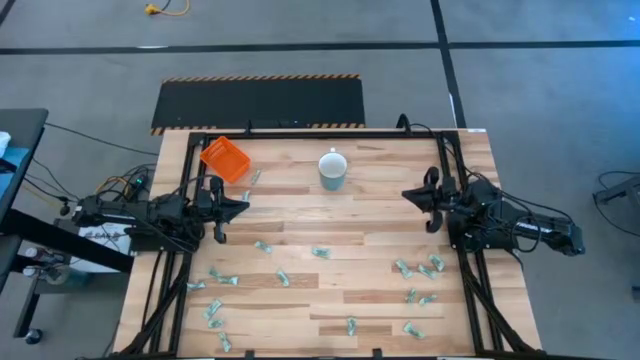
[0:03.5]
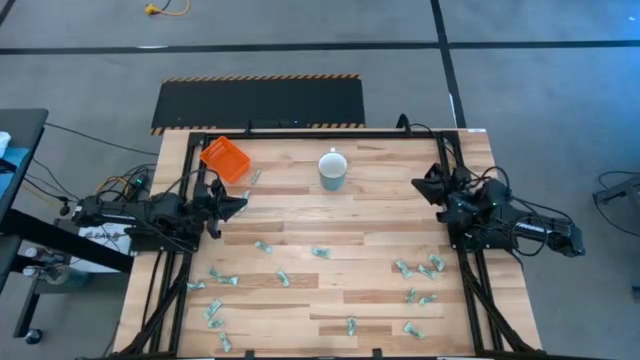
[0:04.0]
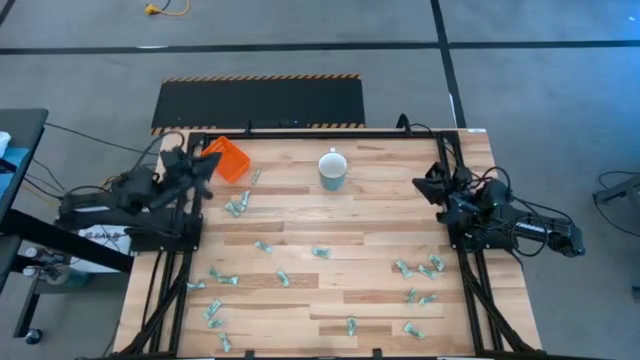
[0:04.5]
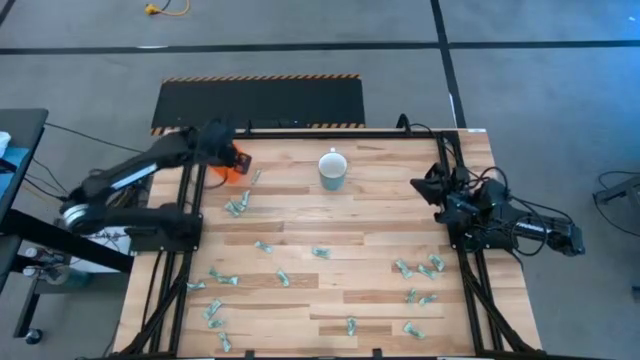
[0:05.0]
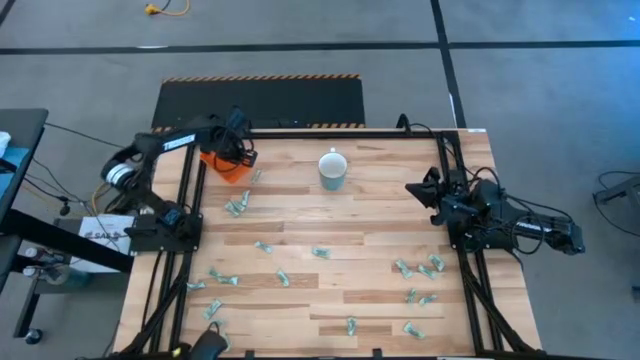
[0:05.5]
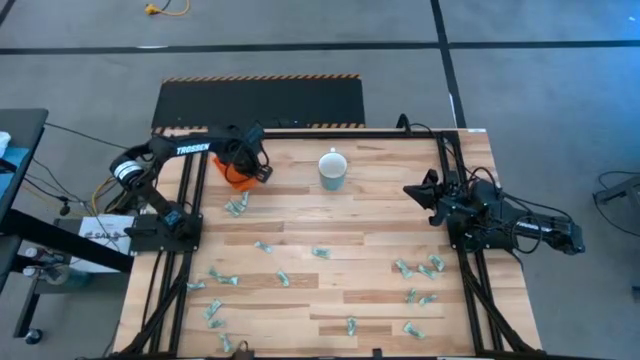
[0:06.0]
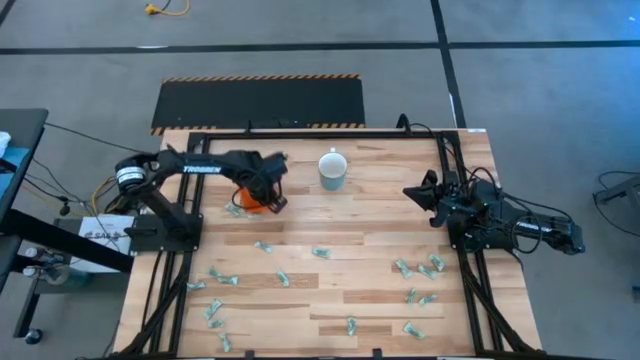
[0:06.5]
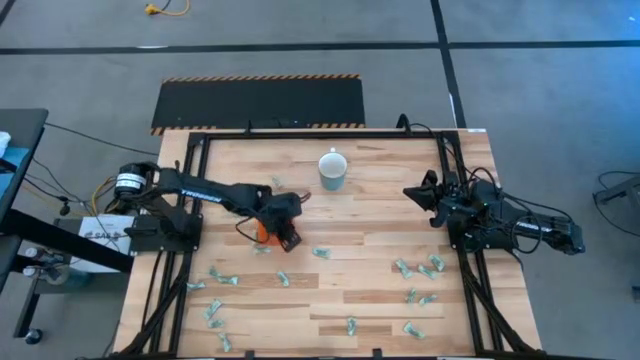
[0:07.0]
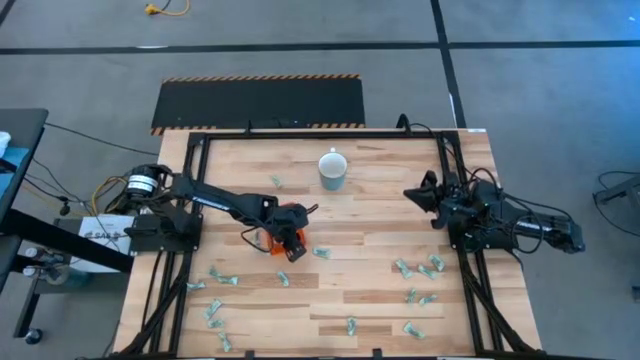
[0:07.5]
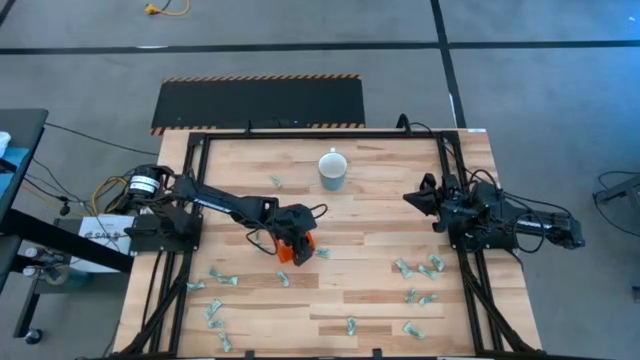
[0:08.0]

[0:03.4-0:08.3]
Task: Pick and place items into bin
Prepare the orange bin

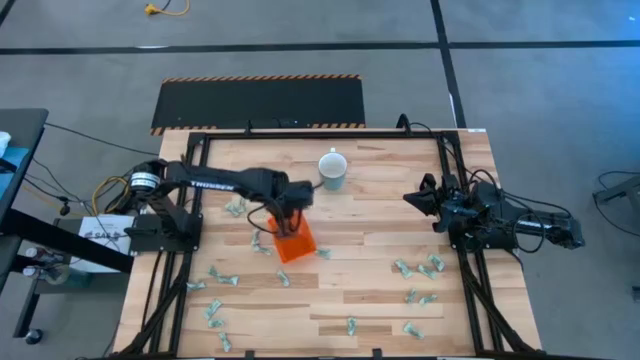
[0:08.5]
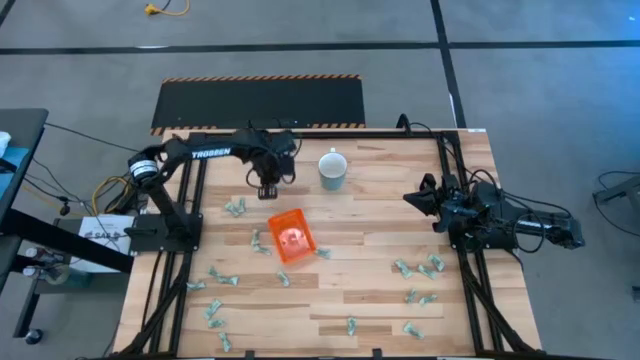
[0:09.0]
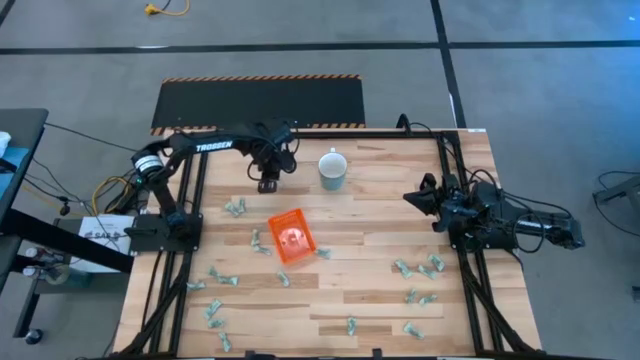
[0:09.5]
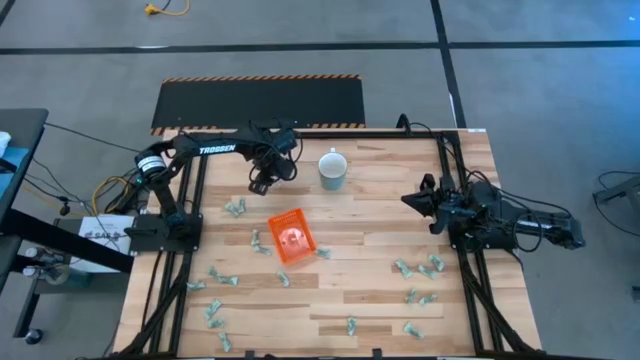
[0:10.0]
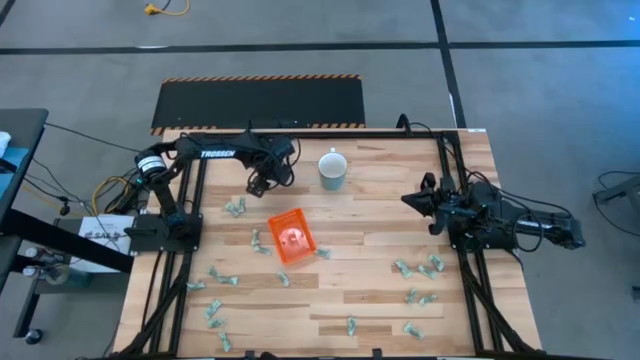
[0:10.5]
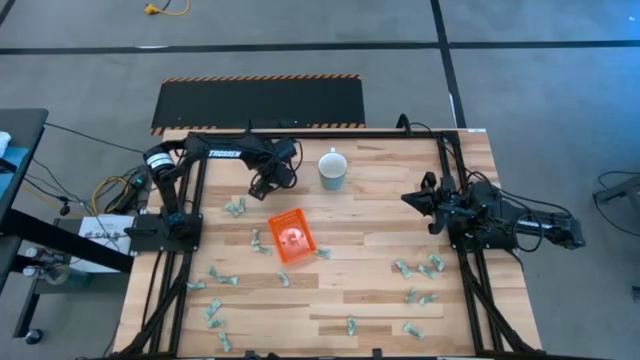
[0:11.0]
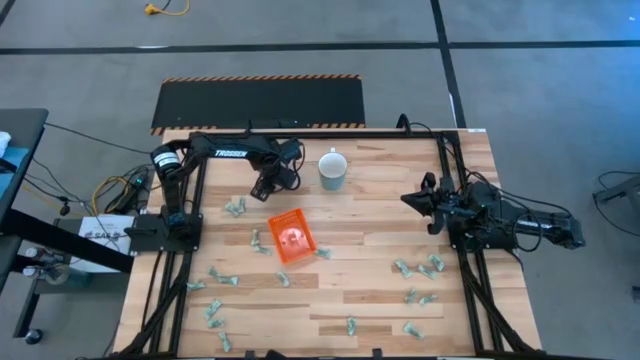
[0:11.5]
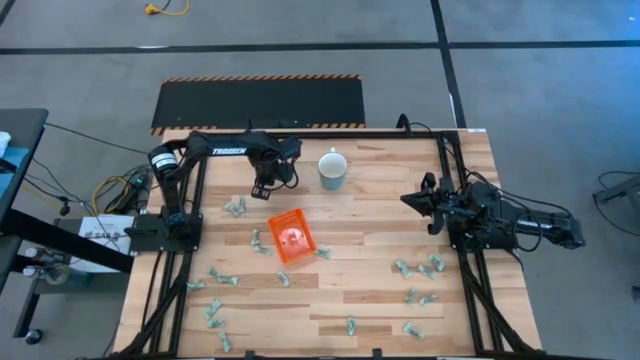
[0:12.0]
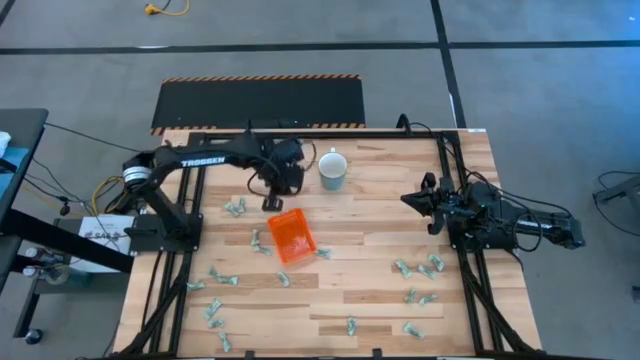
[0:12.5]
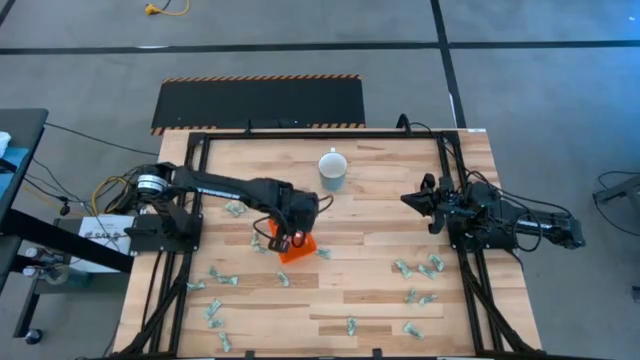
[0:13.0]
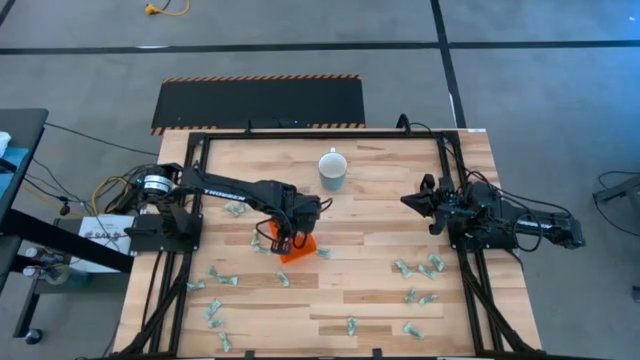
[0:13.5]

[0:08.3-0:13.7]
Put the green stevia packet into the orange bin

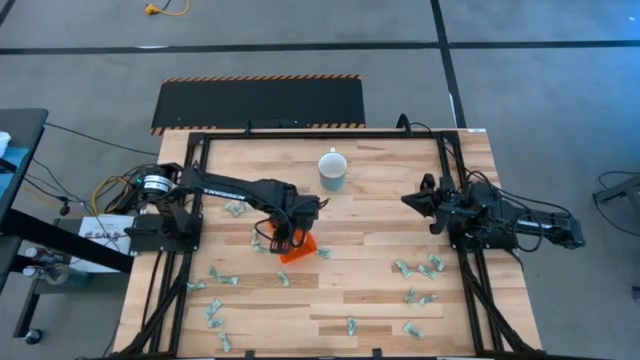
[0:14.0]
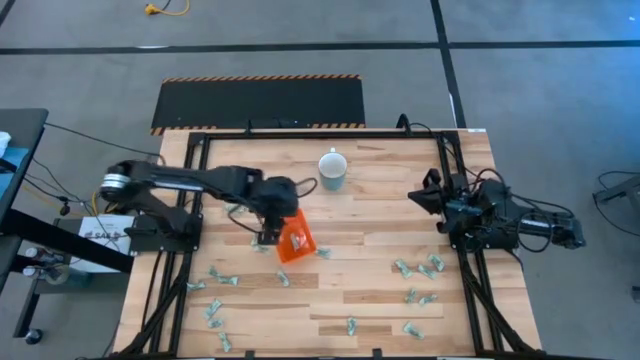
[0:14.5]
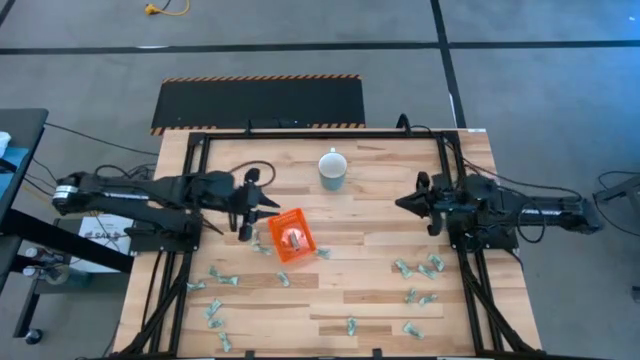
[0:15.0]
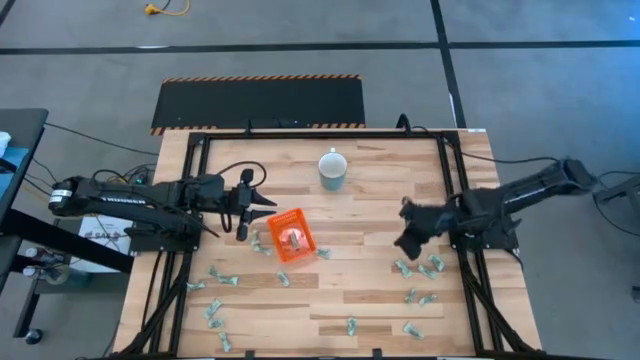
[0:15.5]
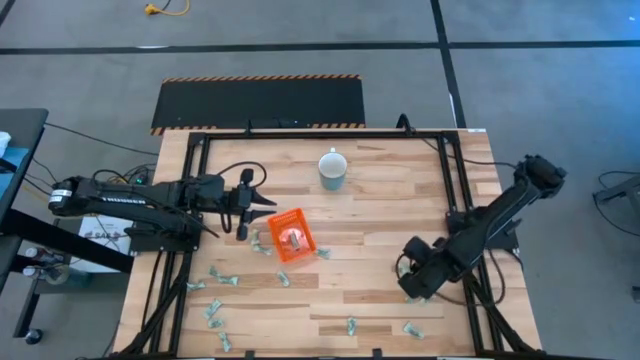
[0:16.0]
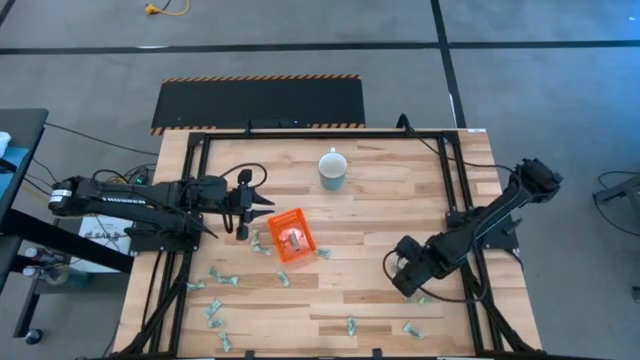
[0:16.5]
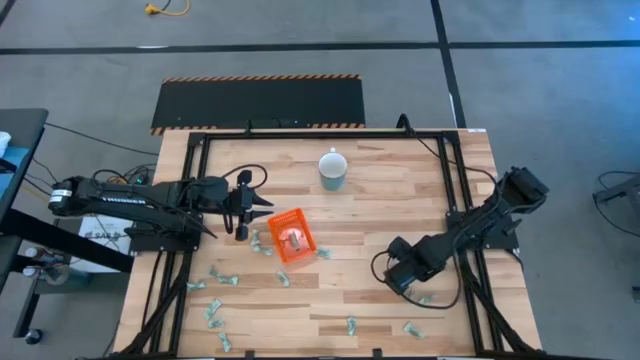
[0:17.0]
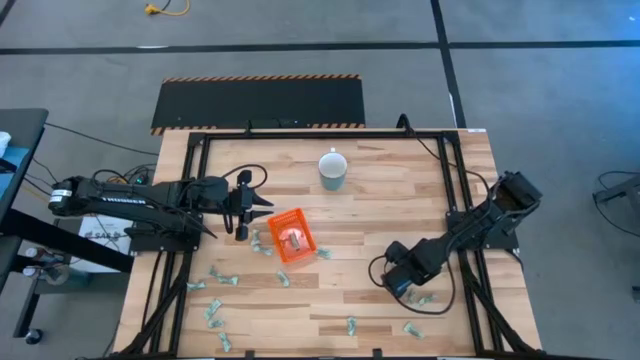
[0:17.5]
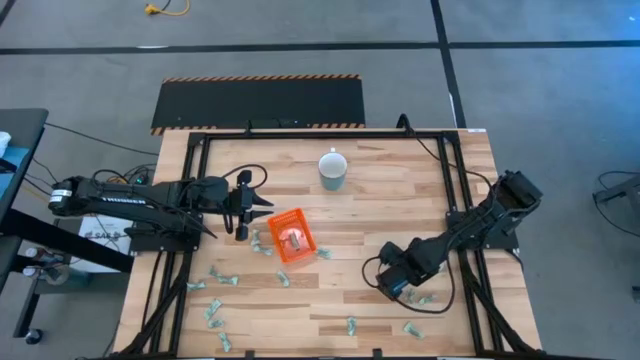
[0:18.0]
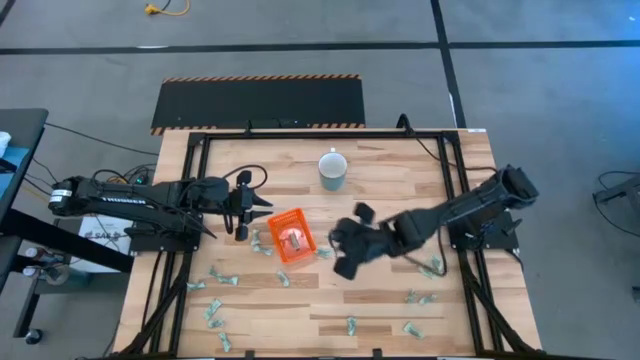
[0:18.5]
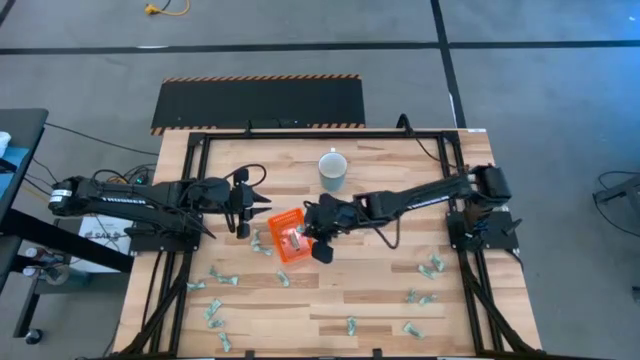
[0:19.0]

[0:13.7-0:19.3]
Put the green stevia packet into the orange bin

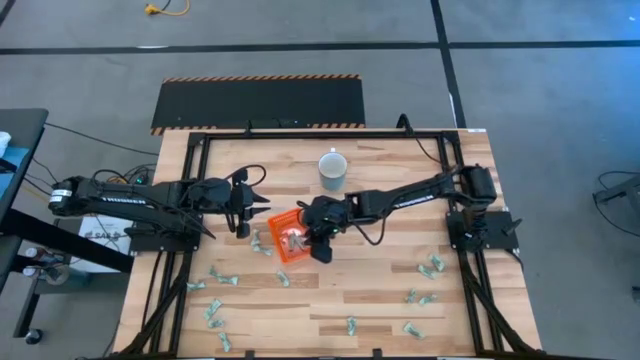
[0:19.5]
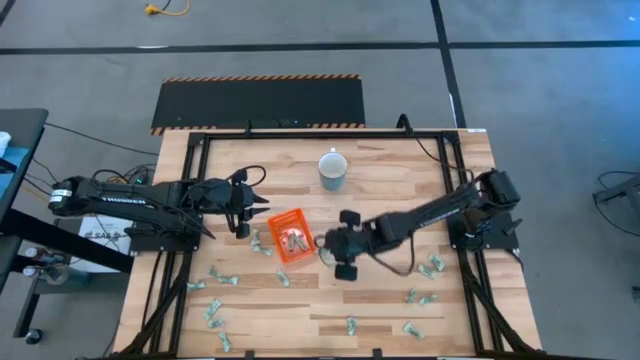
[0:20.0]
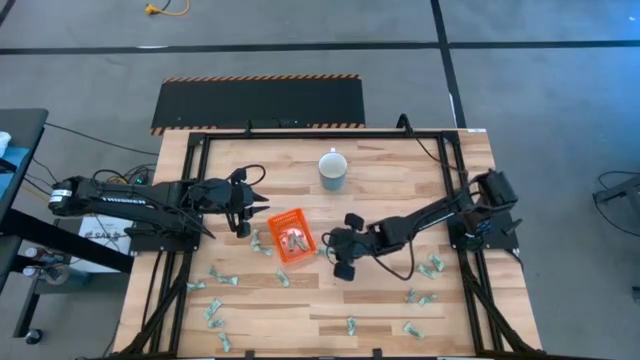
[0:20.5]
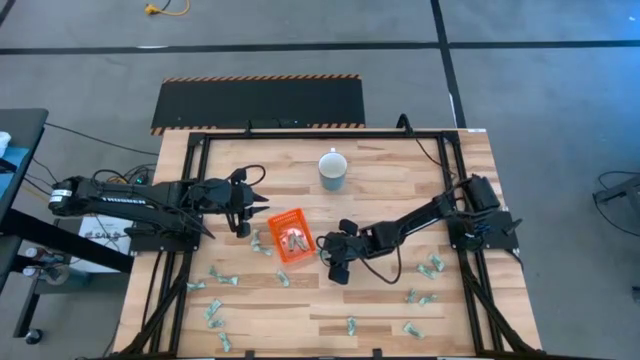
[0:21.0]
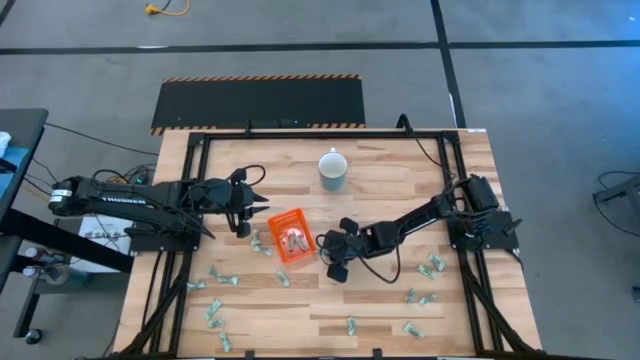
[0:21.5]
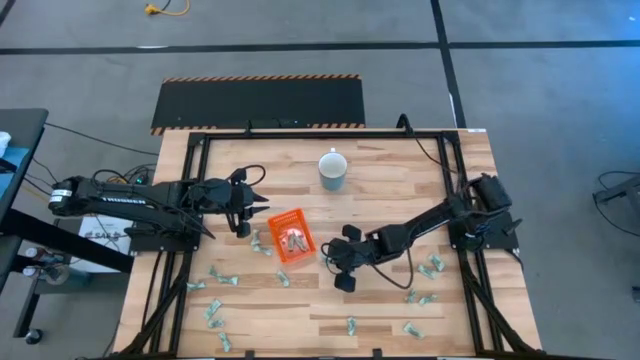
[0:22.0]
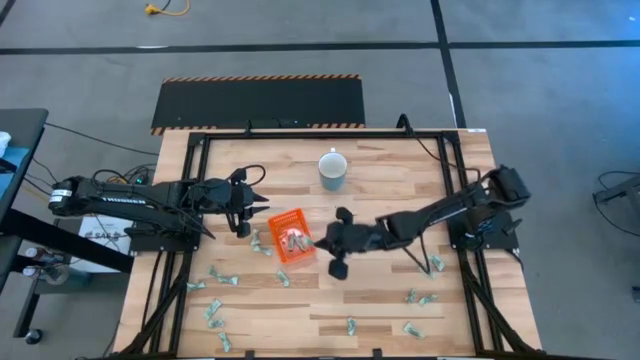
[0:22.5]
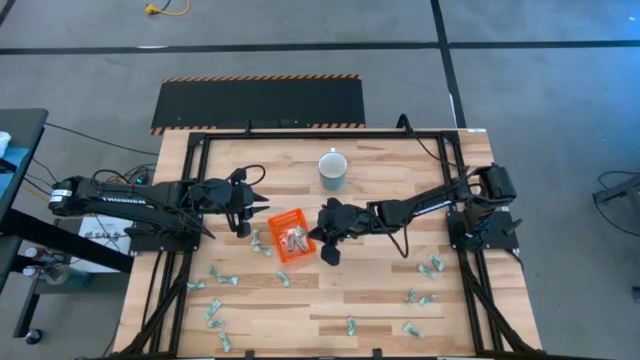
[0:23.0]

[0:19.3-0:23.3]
Put the green stevia packet into the orange bin

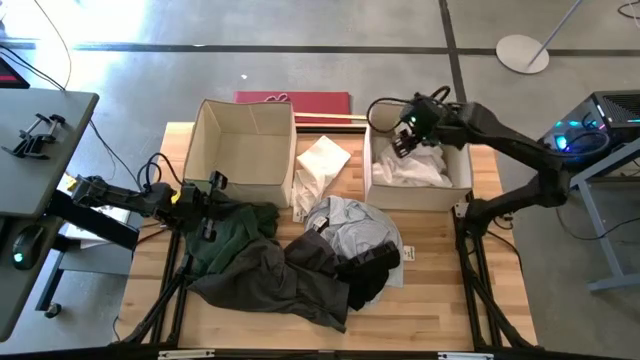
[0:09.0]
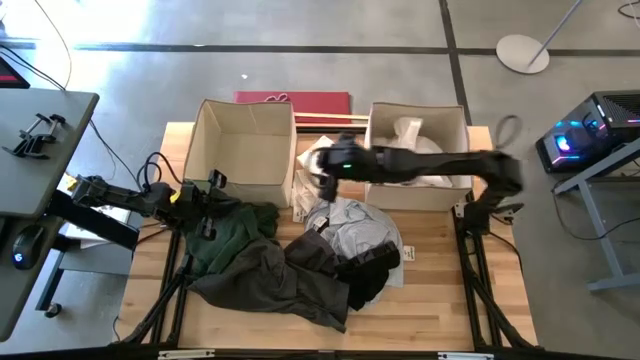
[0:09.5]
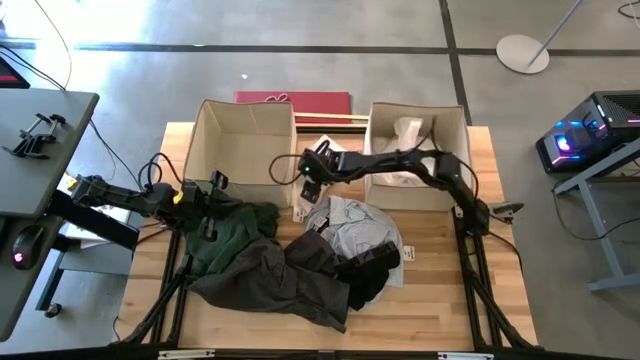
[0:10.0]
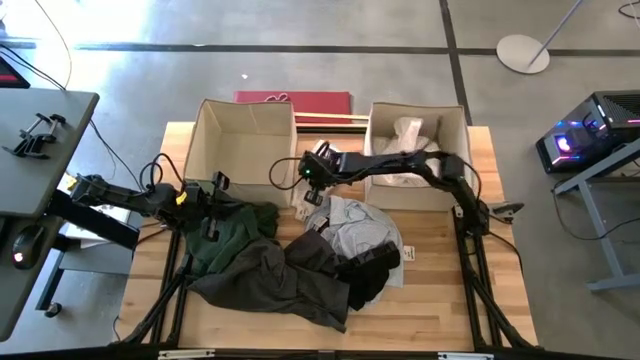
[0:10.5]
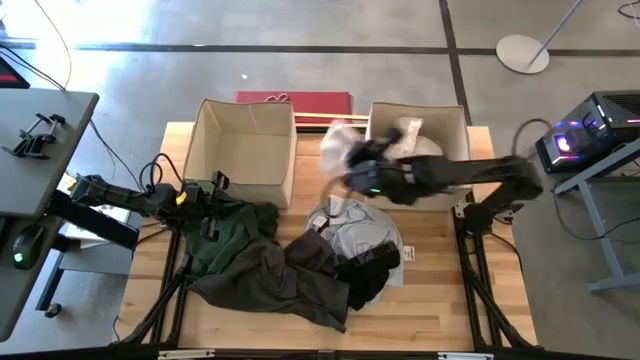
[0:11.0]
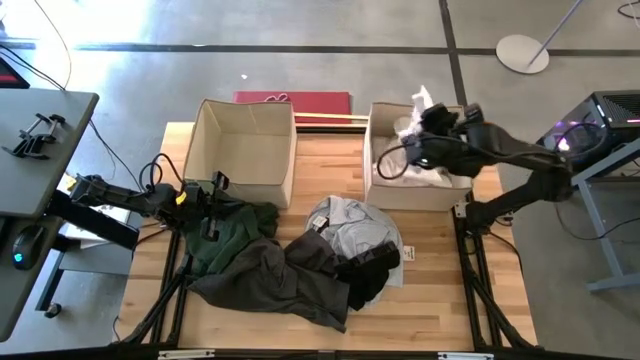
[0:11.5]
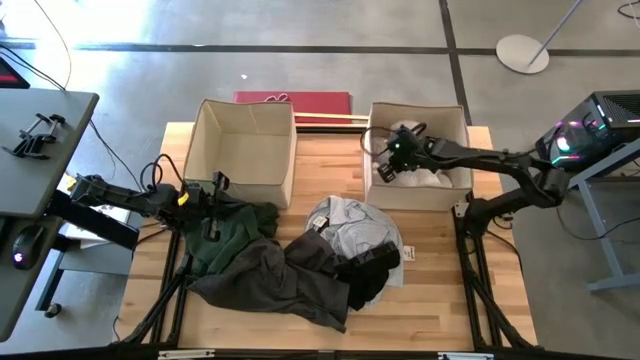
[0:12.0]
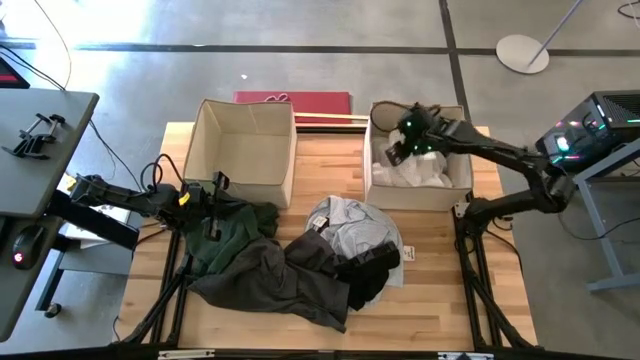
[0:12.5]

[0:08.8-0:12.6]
Task: Sort clothes
Put the white shorts into the right brown laundry bin
